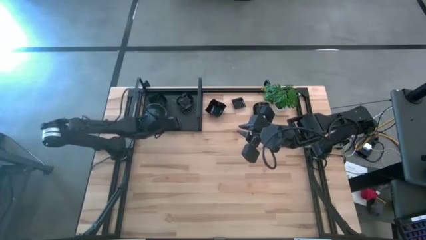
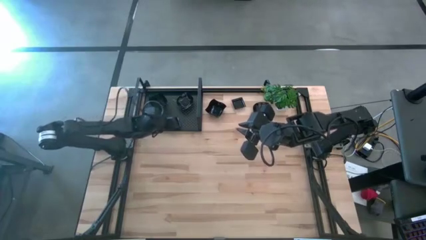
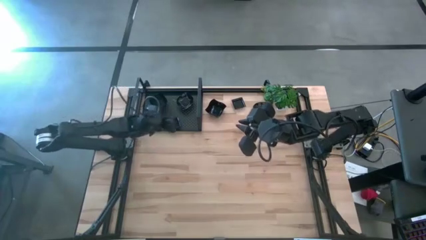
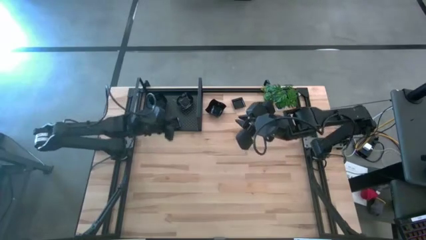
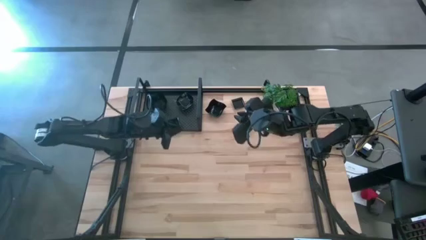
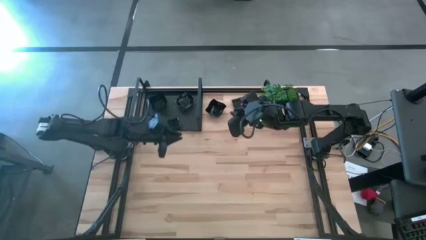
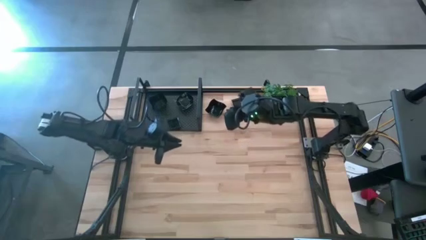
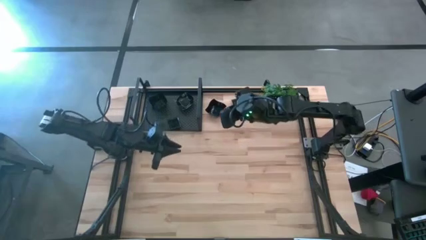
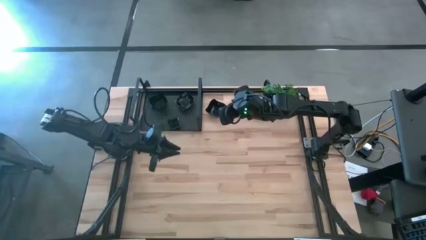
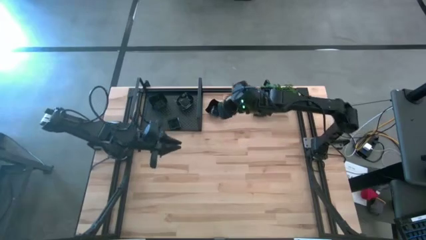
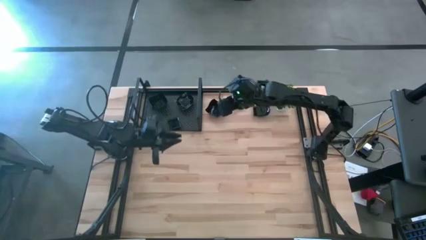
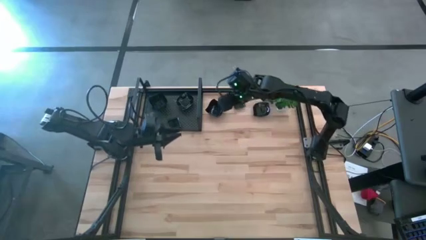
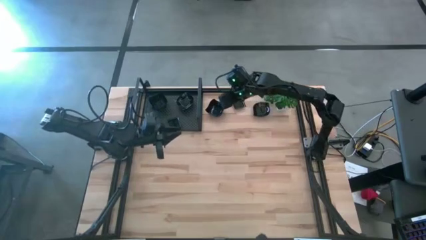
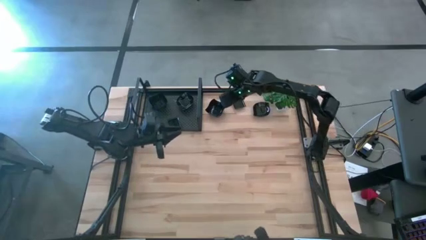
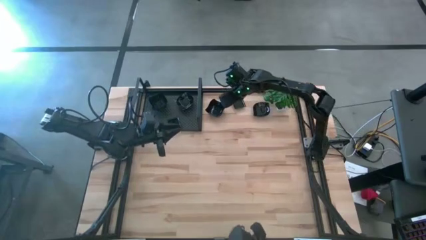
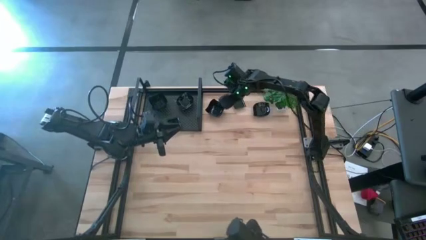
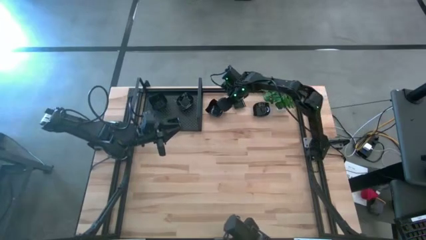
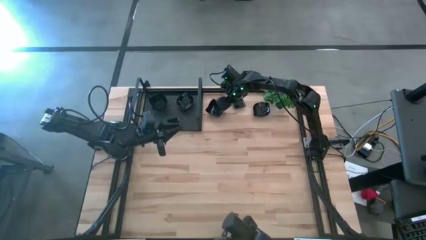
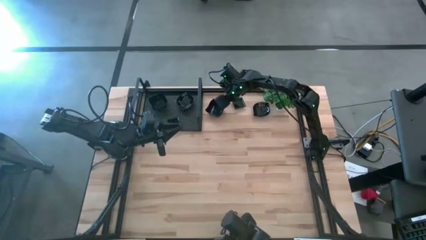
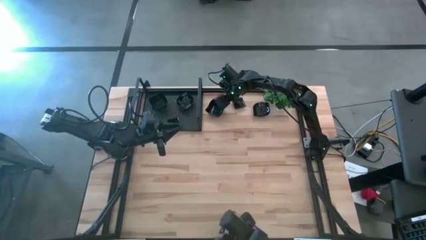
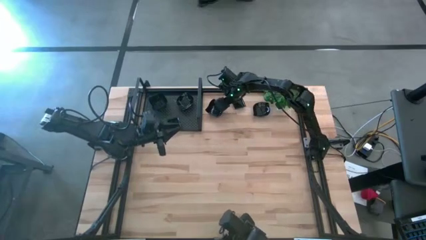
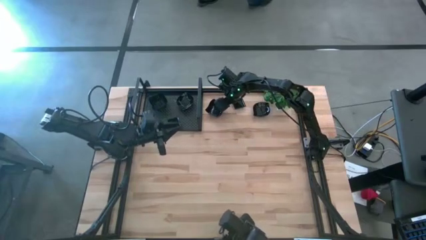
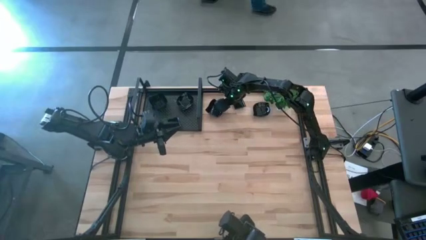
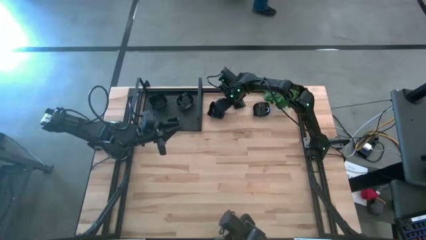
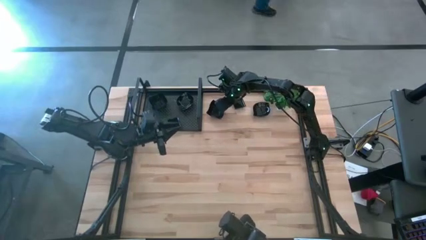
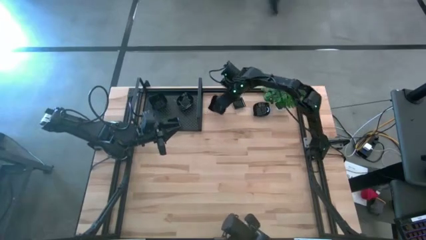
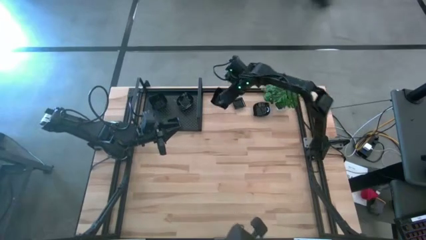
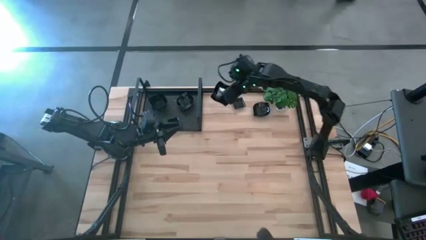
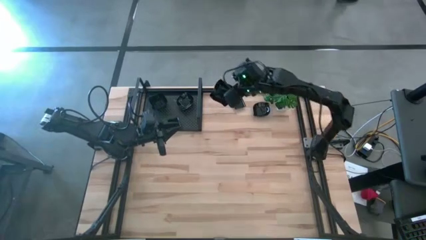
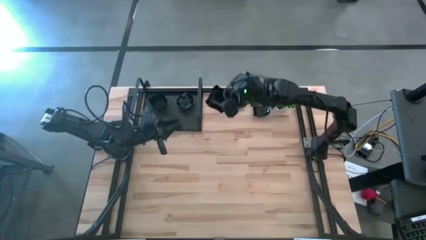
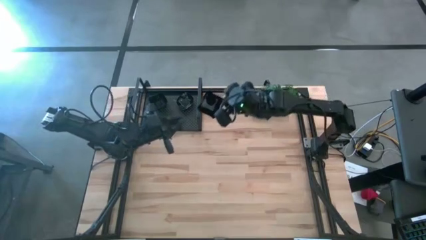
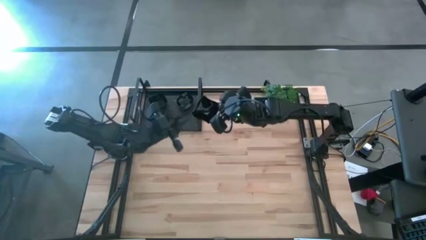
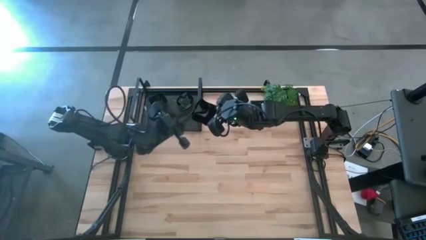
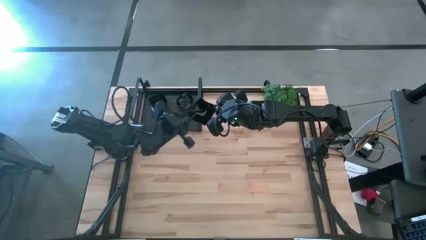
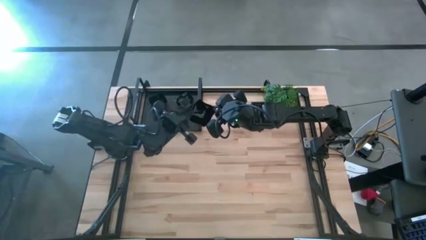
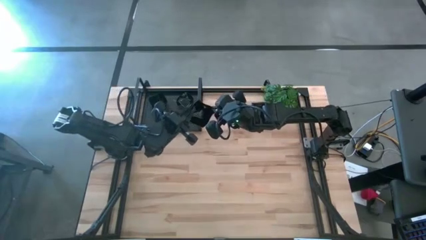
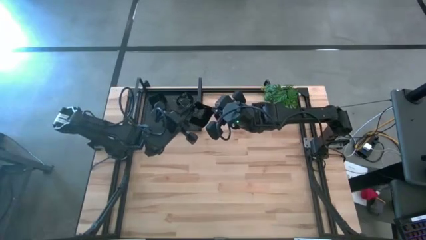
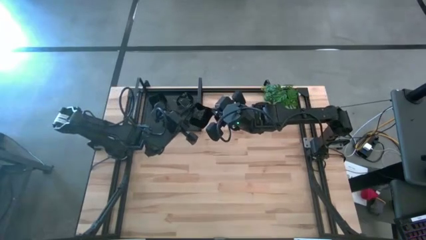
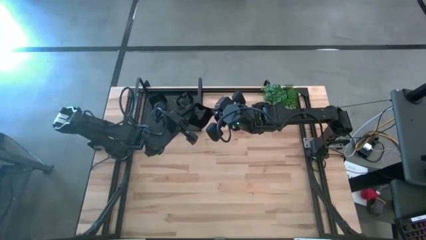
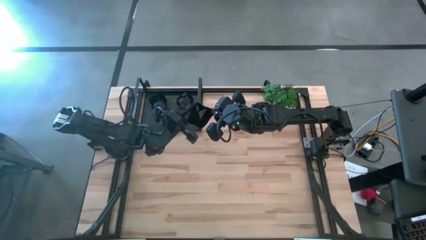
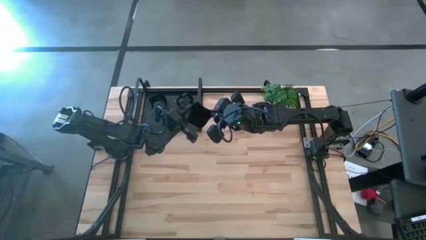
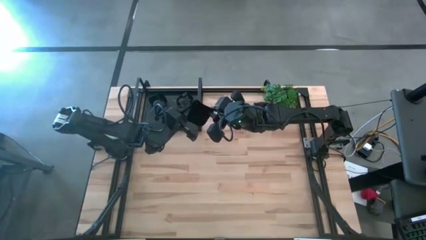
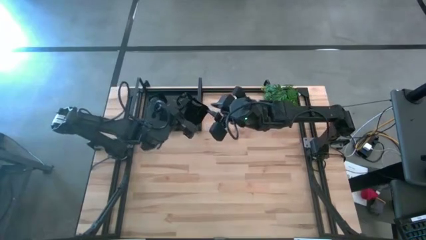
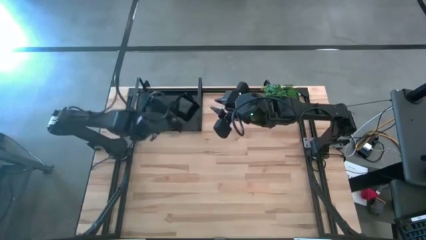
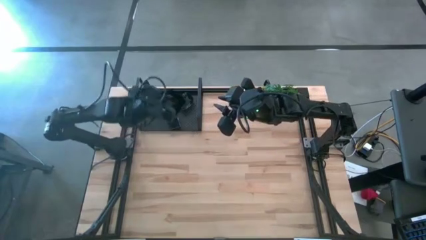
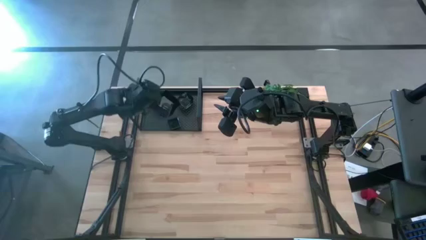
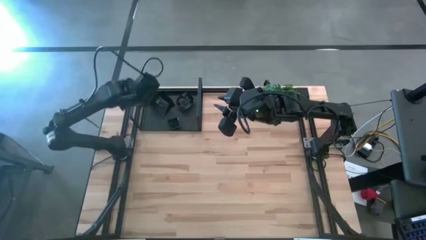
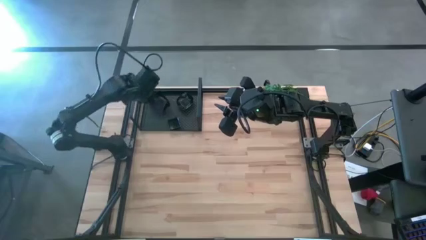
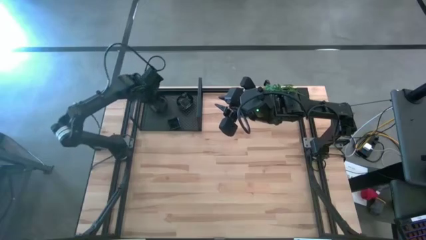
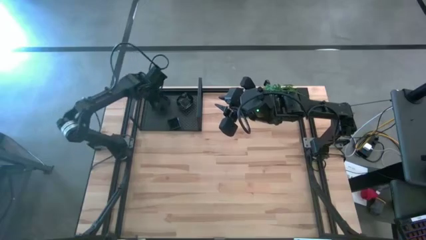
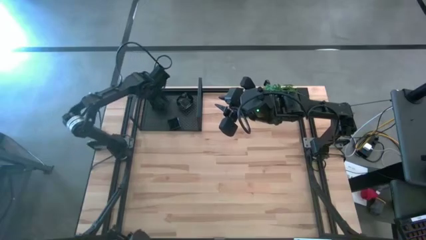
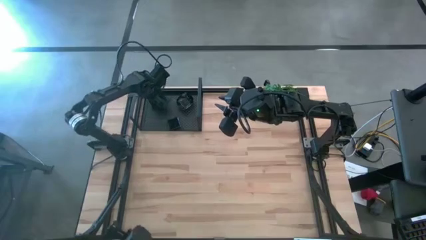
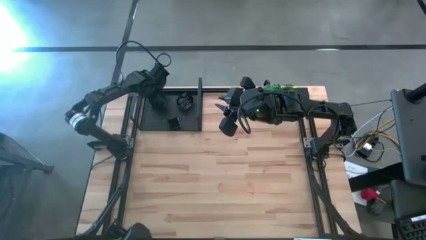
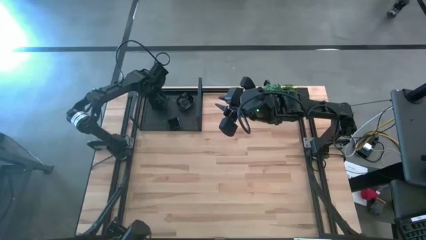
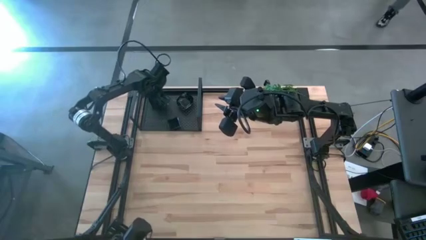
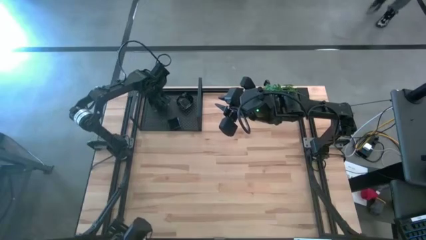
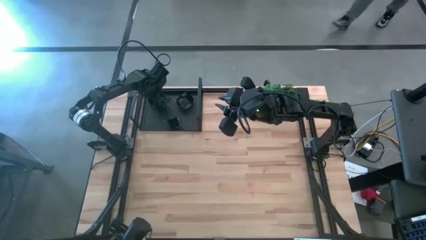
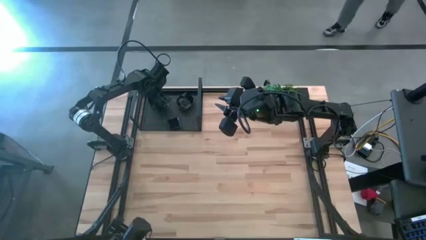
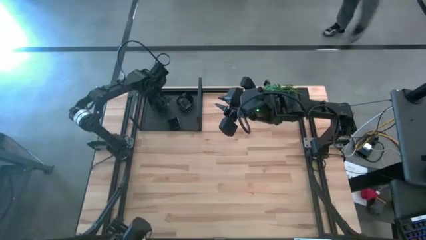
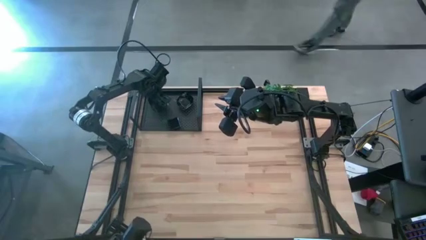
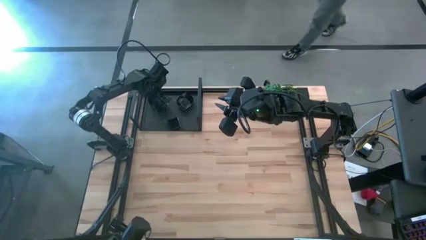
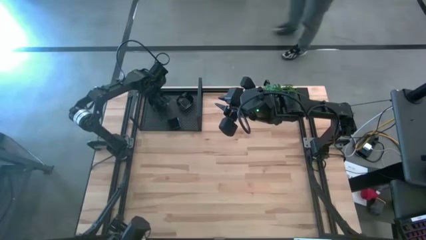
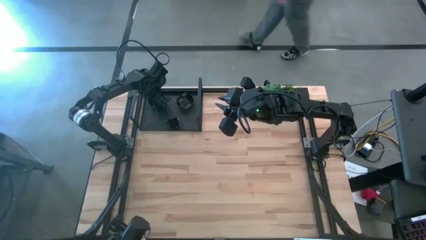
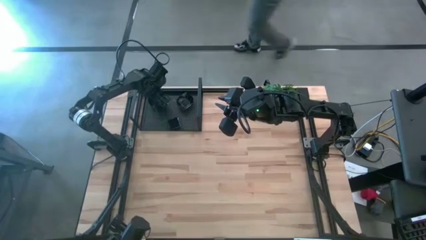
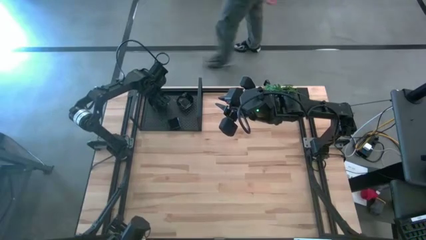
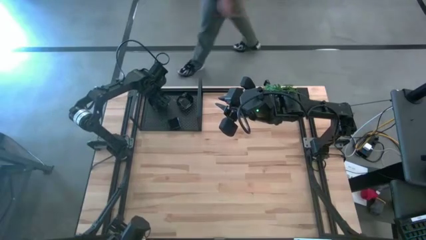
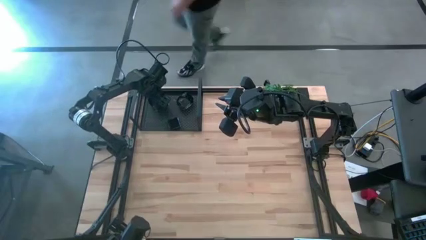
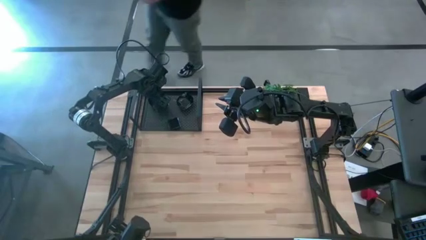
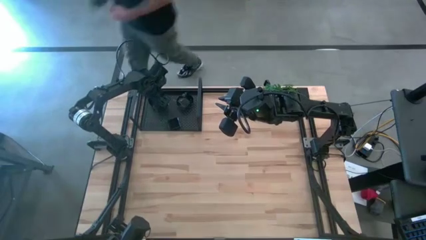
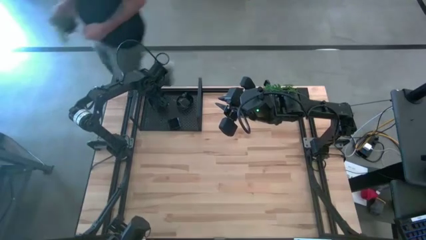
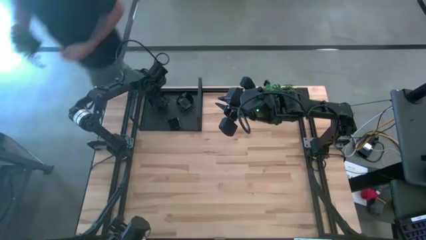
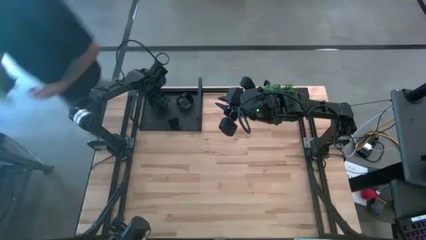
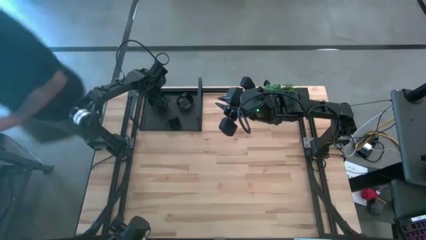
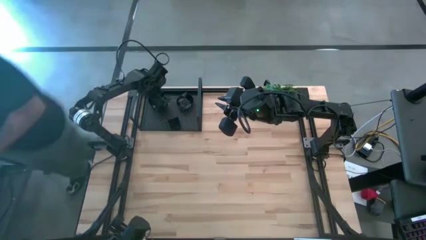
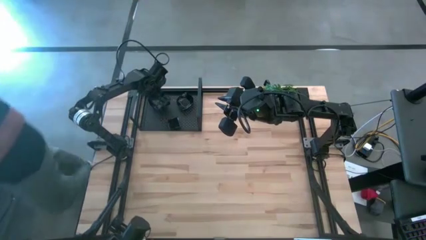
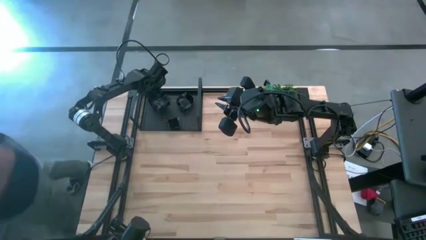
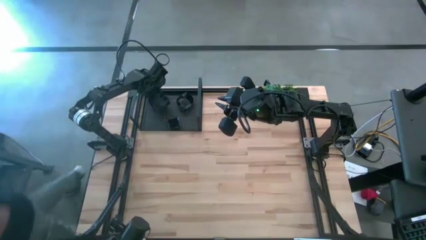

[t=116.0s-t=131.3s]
Task: Pick & Place Mini shaped plates
Stack the black distorted square plate on top of the black distorted square plates on the shelf
